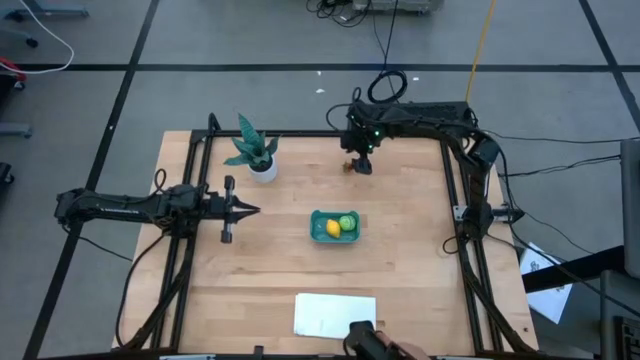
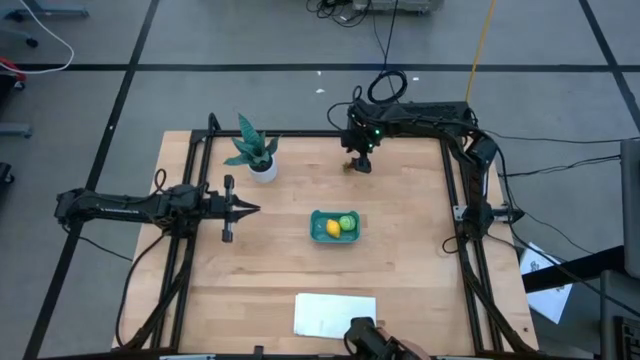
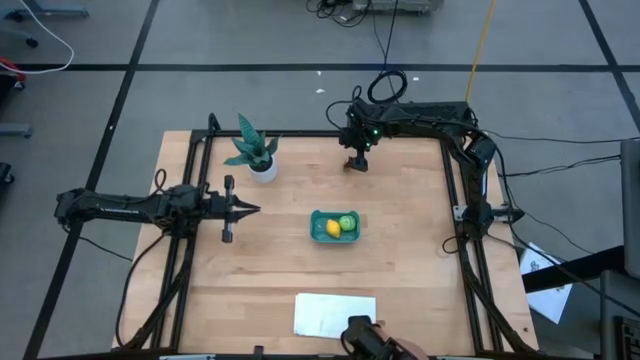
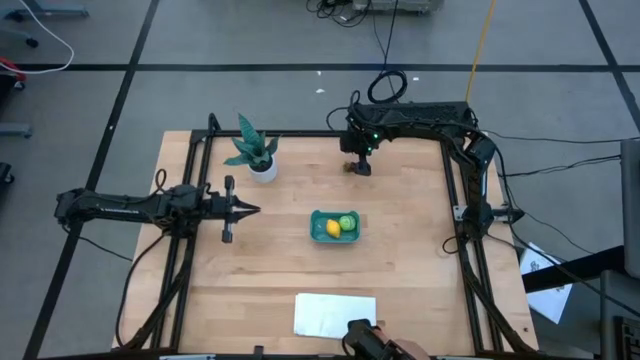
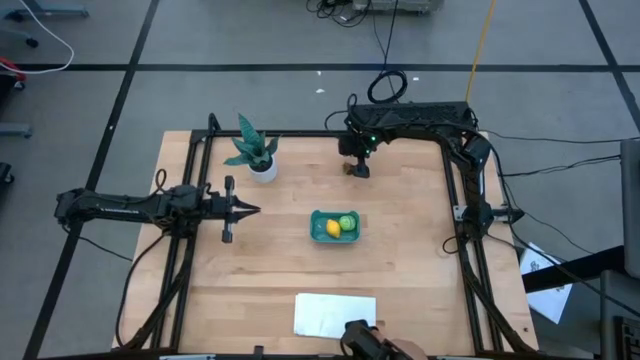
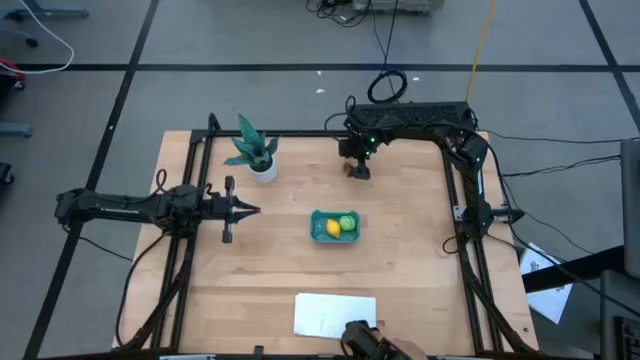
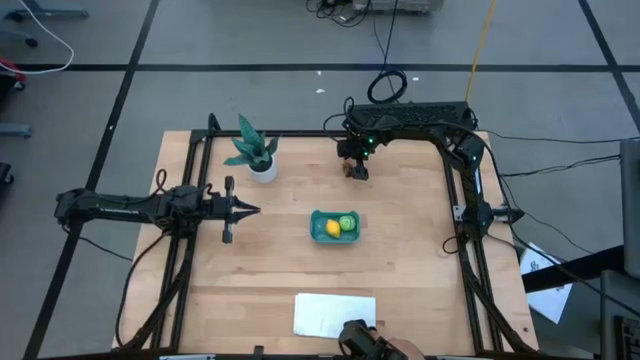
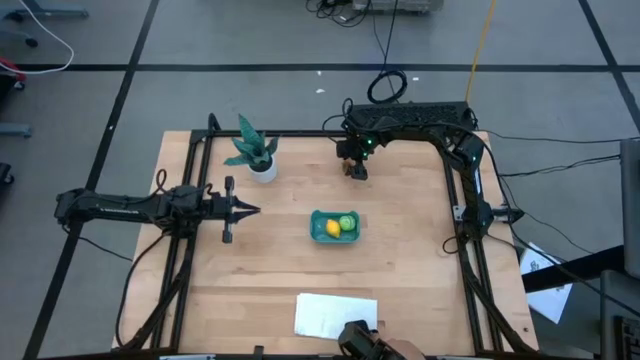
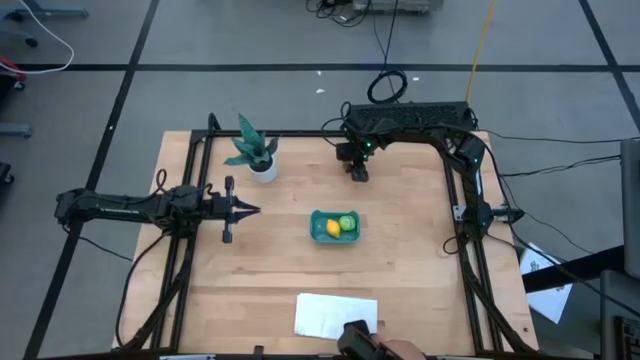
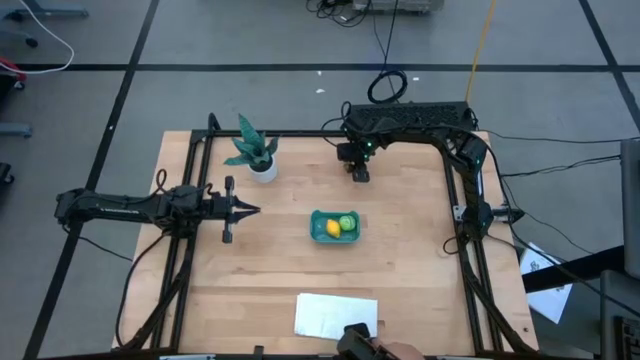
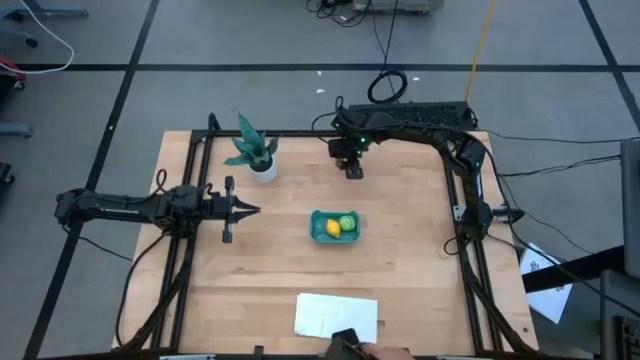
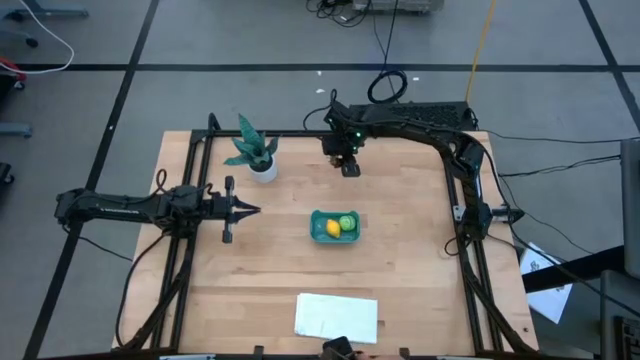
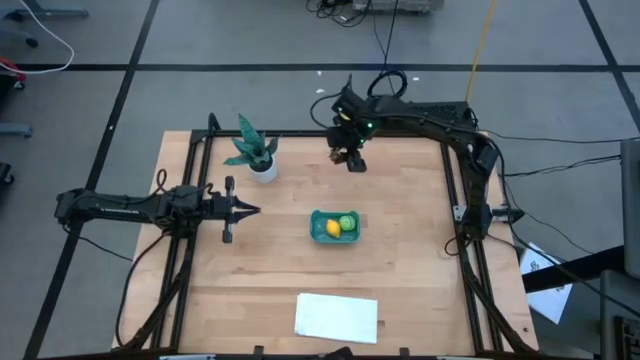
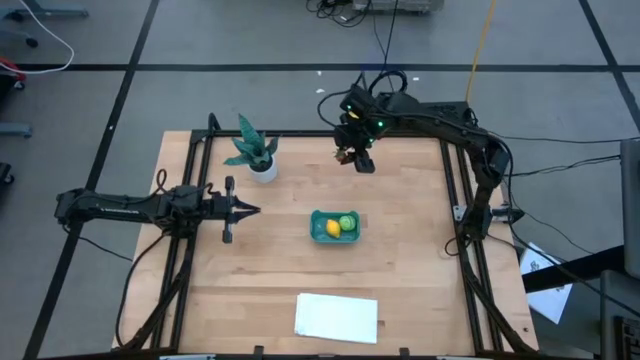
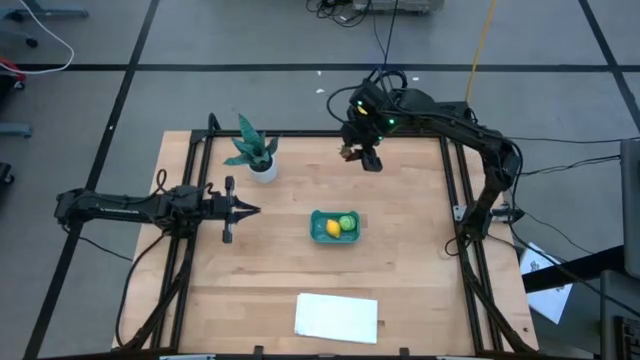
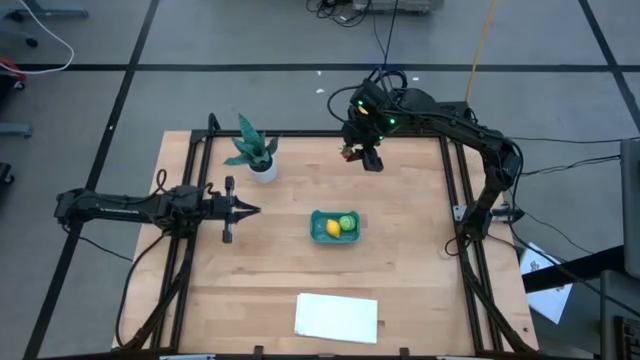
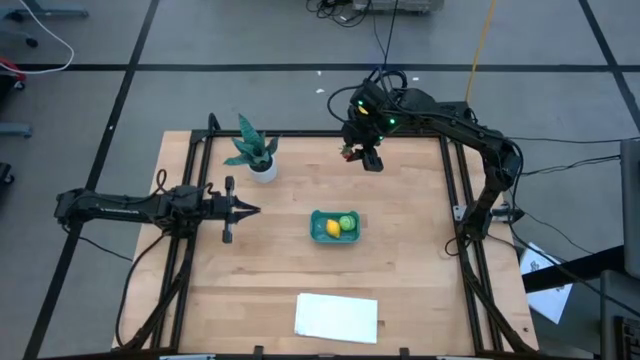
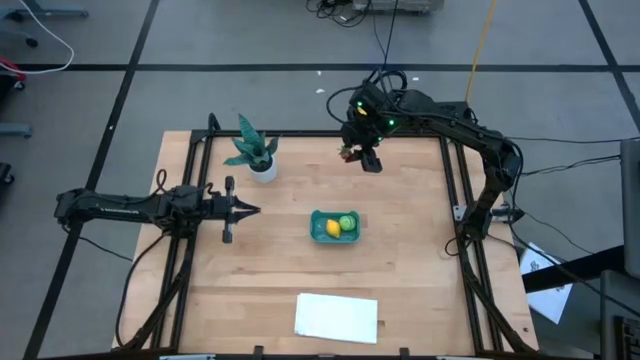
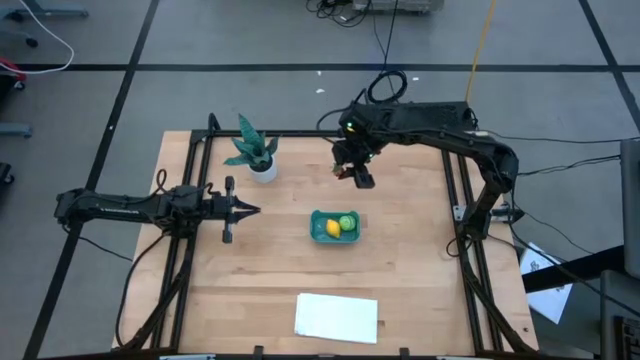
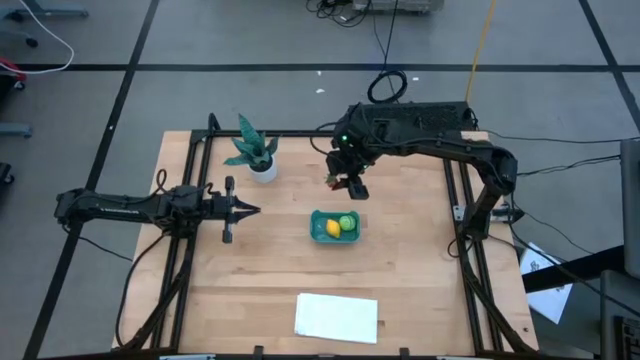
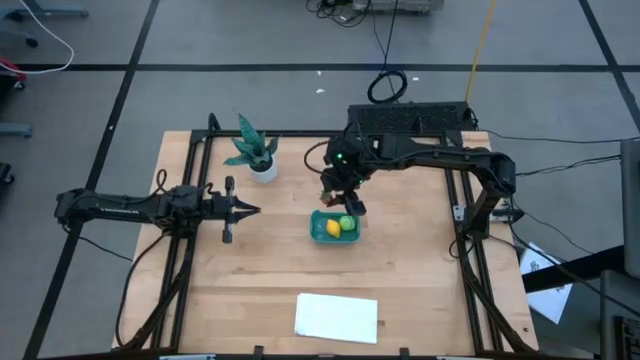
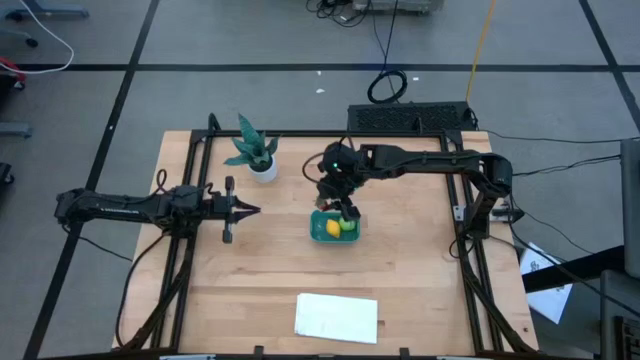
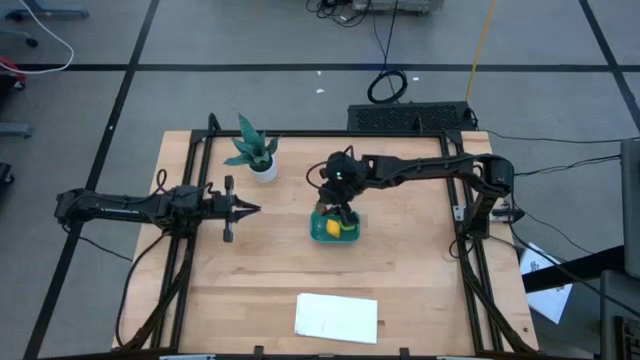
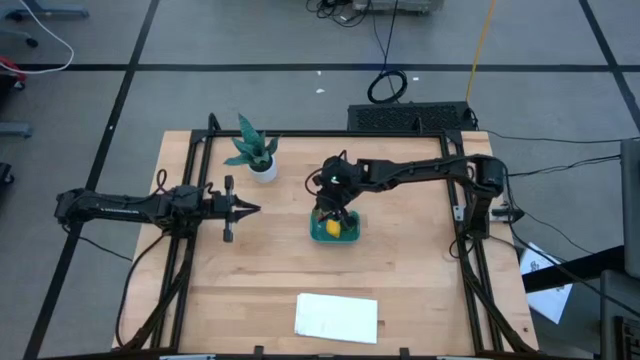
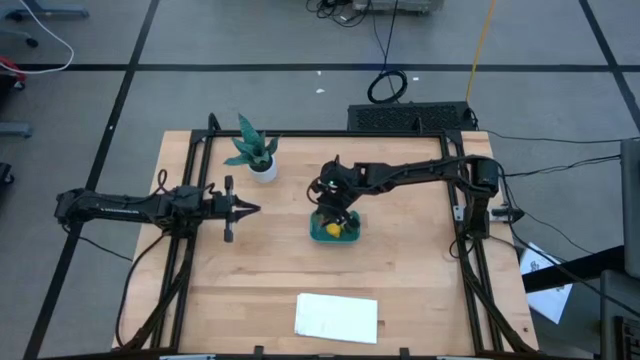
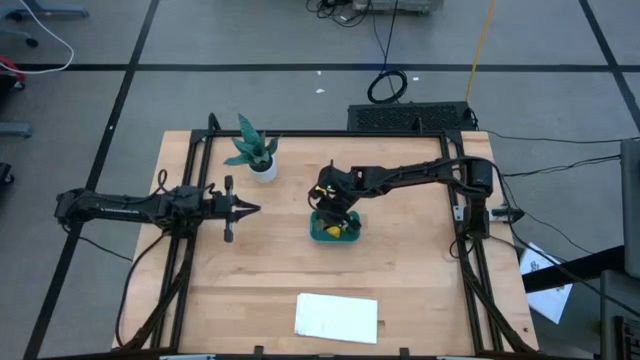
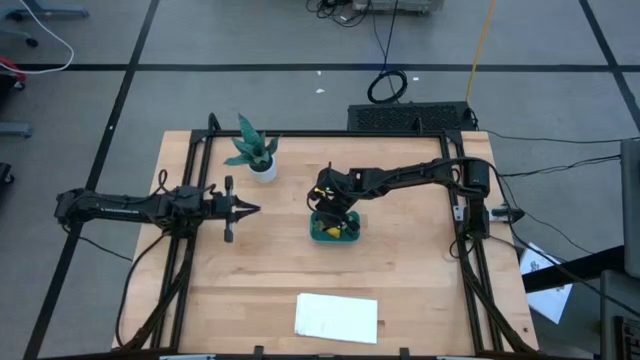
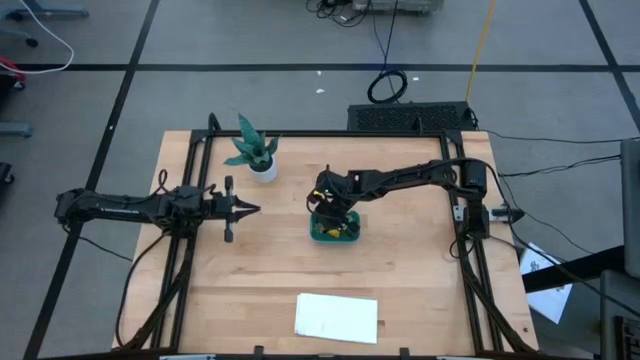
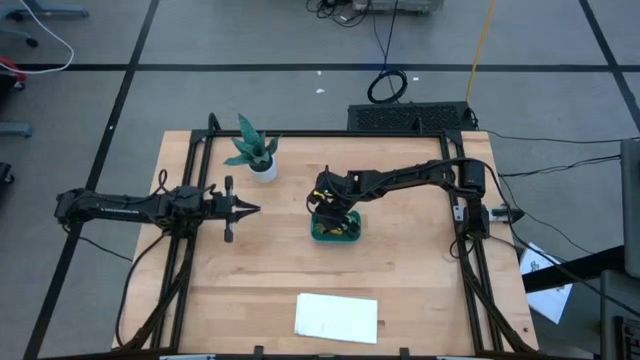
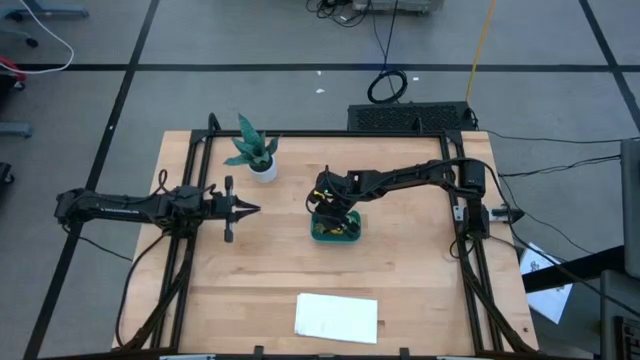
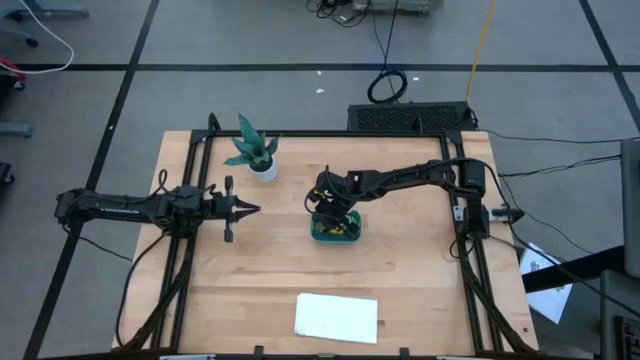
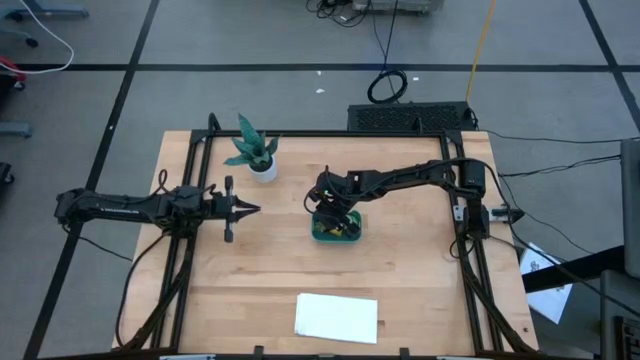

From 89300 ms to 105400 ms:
Task: Pick and placing Produce into tupperware
Put the red strawberry into the blue bin
